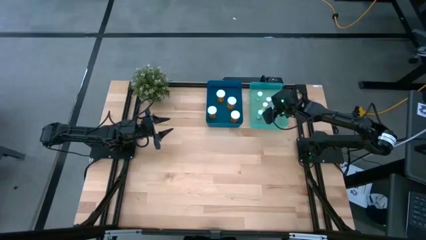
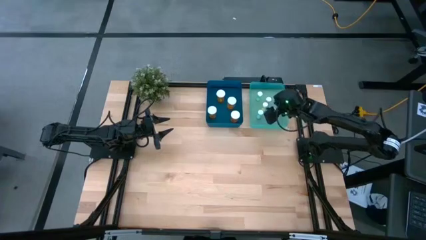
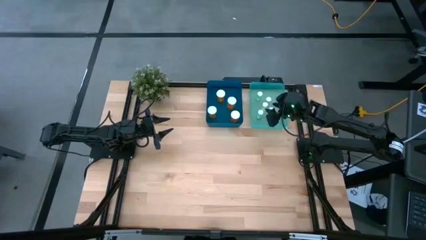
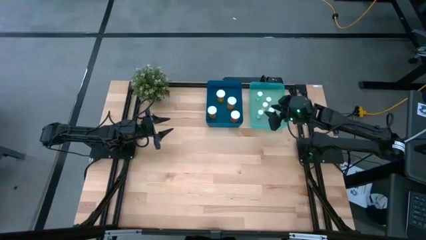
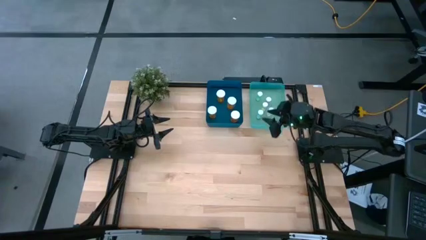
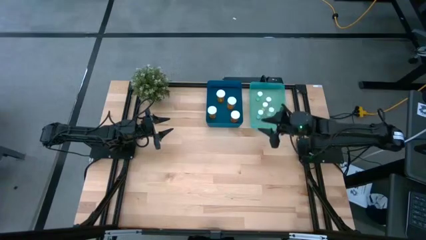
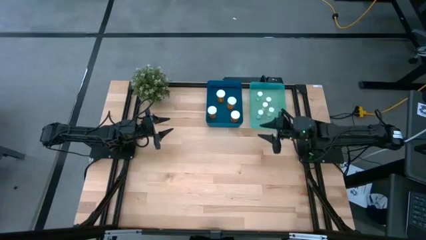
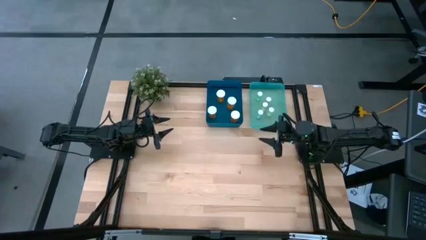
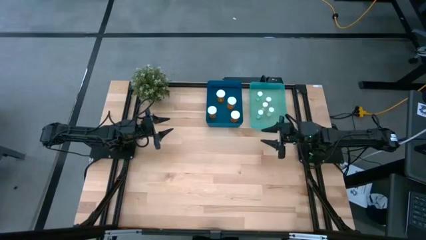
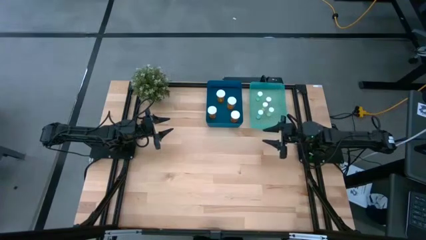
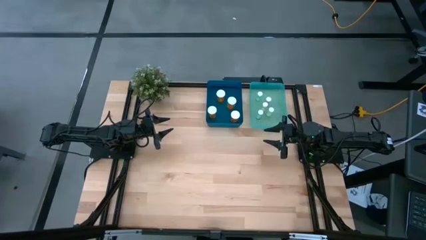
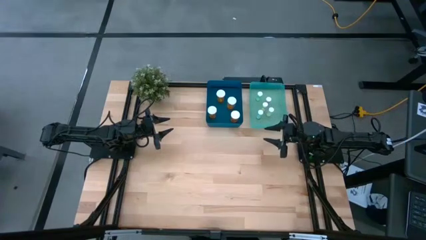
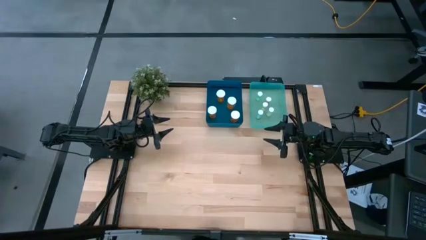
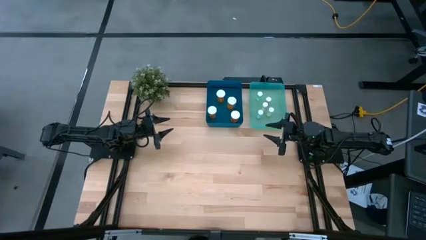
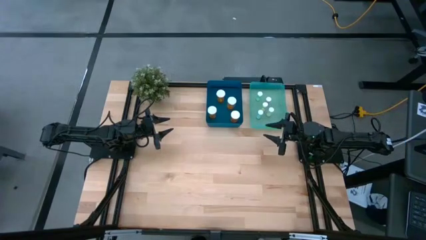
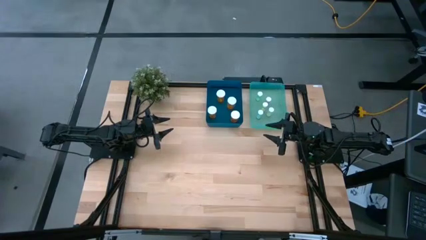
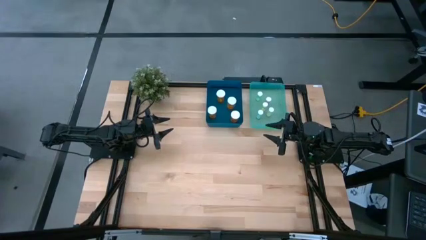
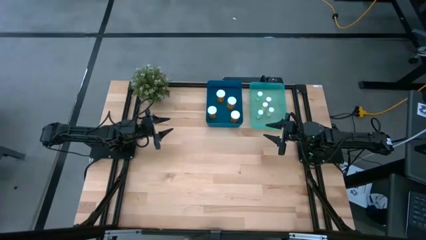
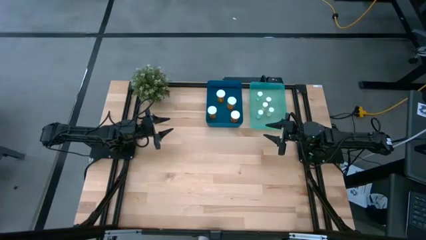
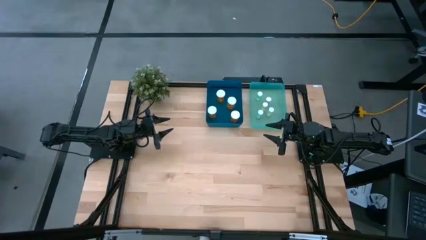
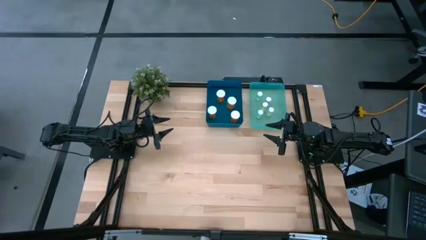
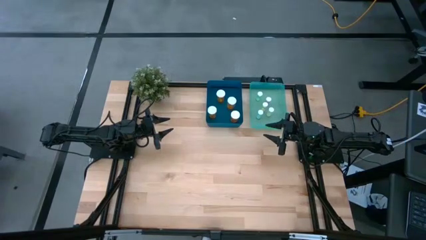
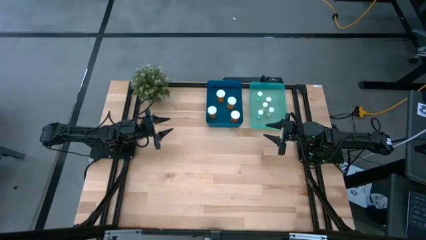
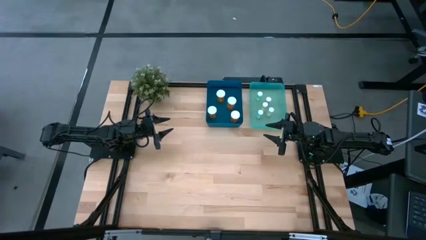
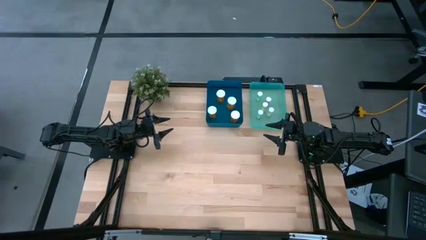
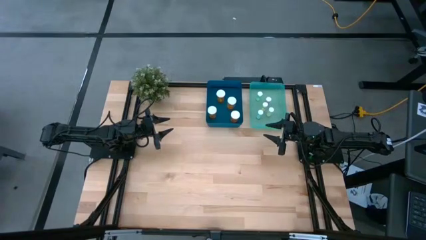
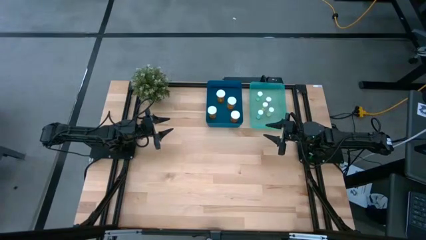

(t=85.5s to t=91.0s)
Task: Pick and place medicine bottles into bin by pill shape (circle, oval)
Return to Home Position

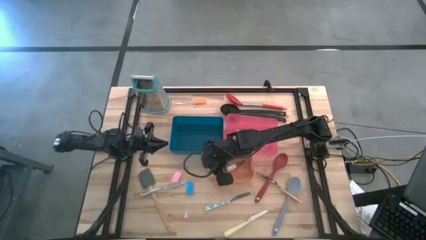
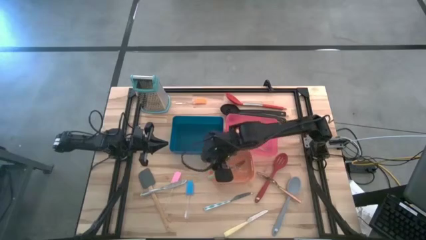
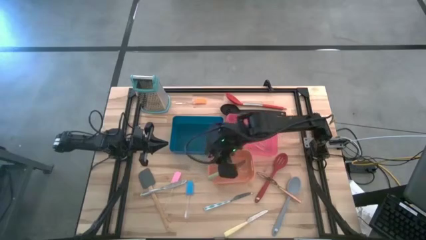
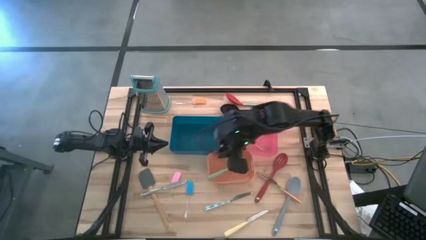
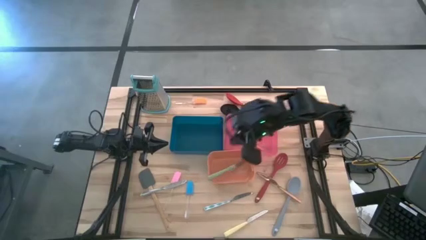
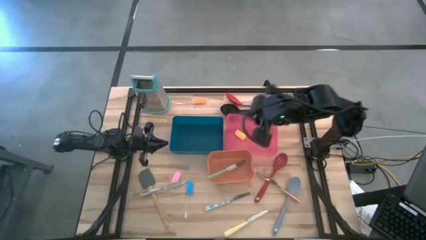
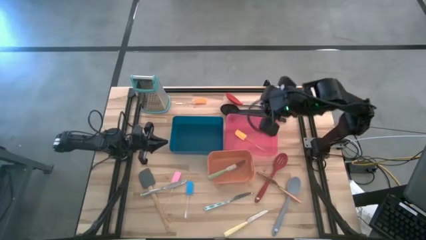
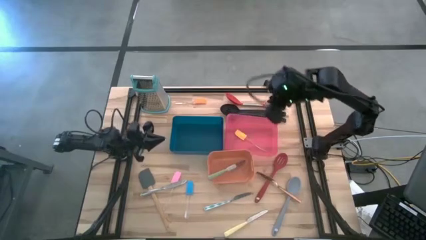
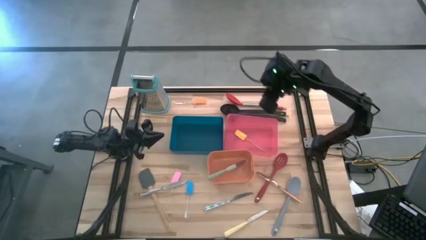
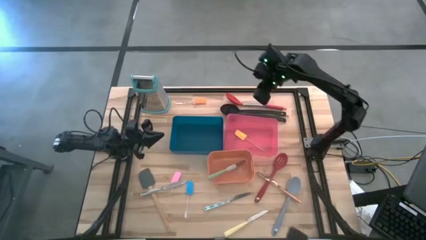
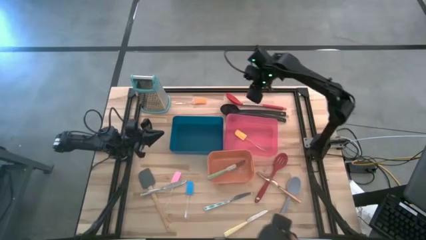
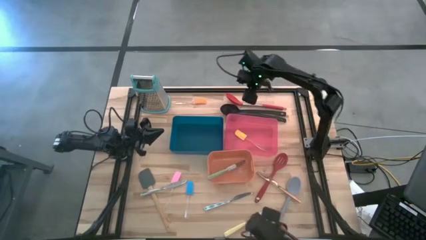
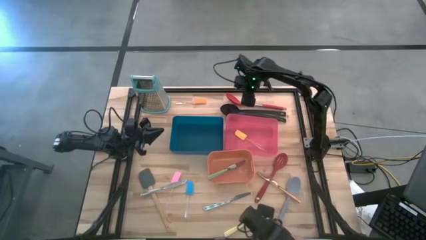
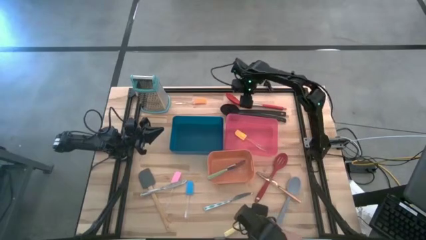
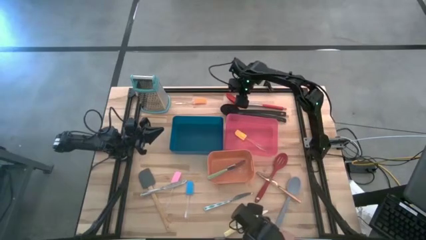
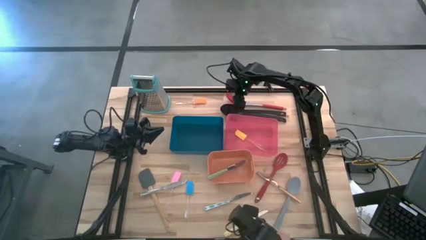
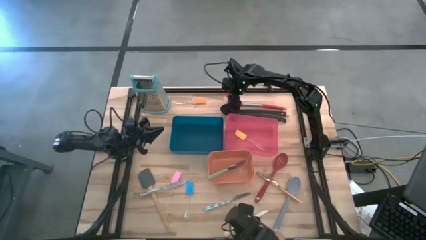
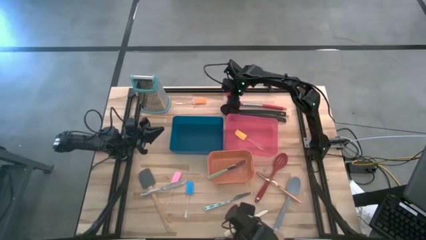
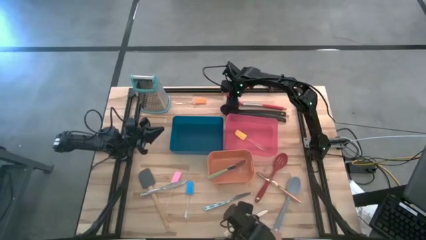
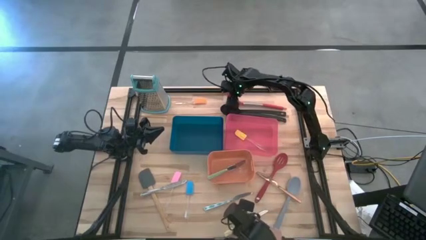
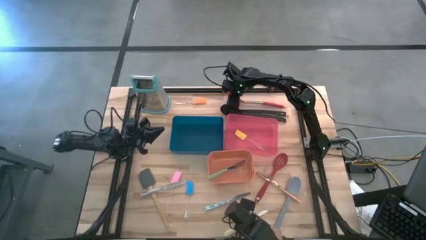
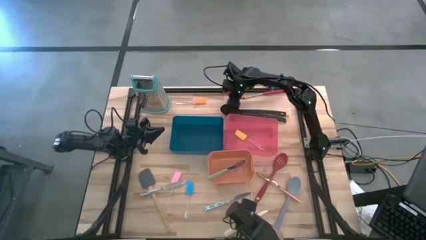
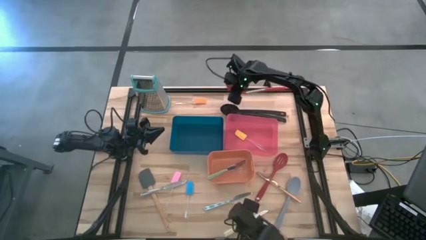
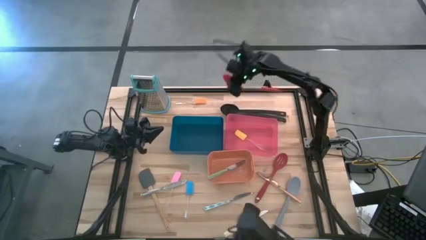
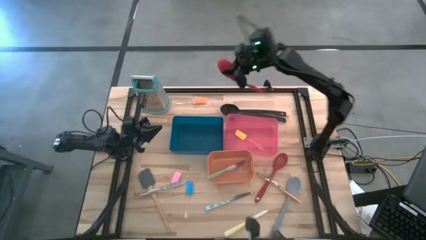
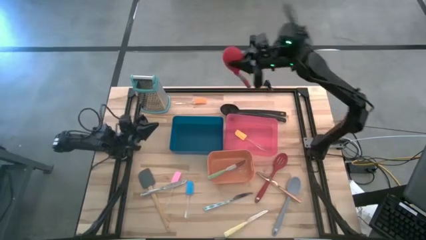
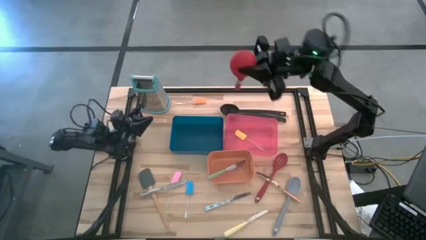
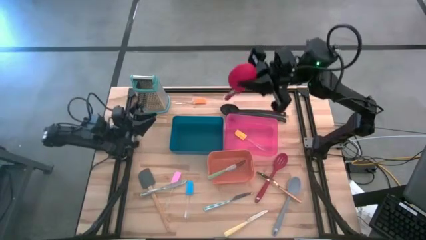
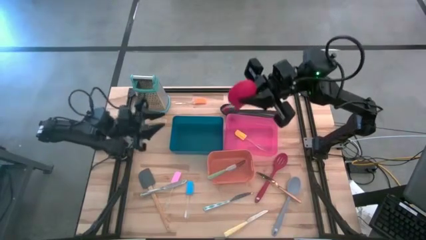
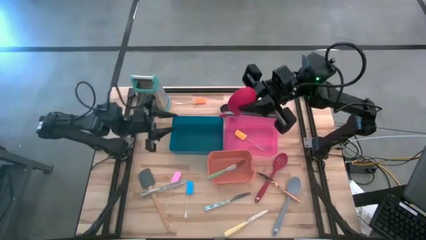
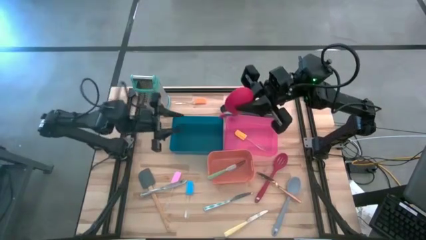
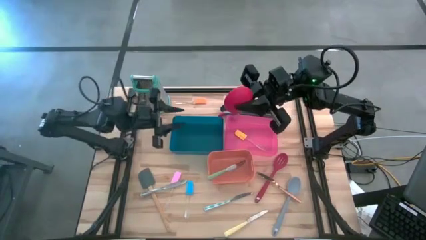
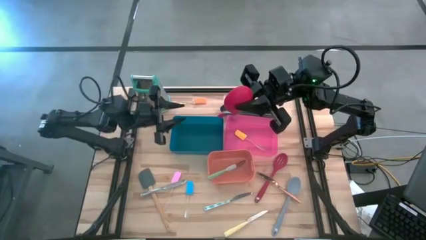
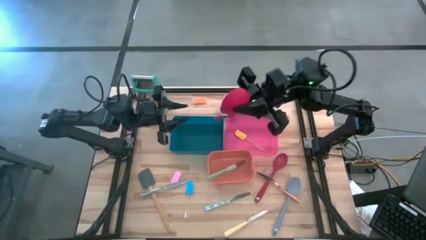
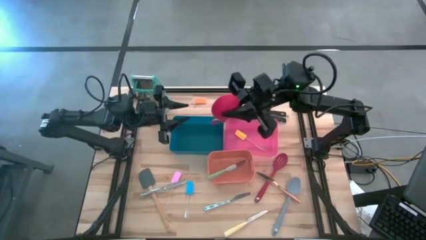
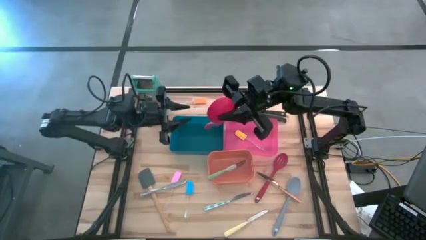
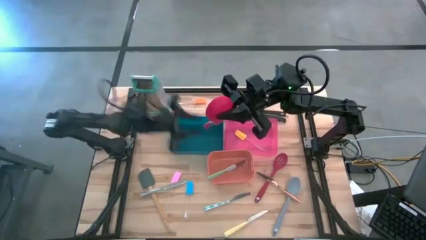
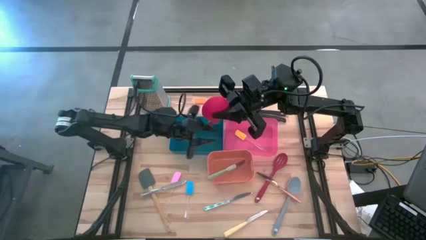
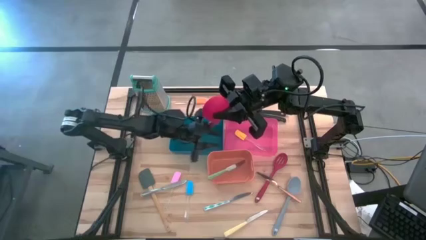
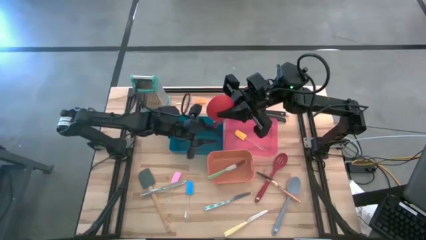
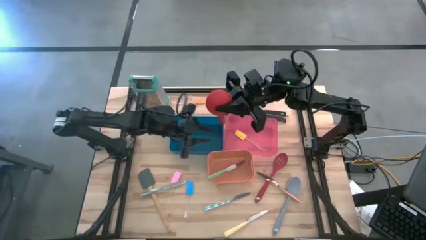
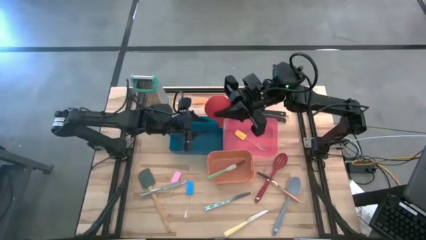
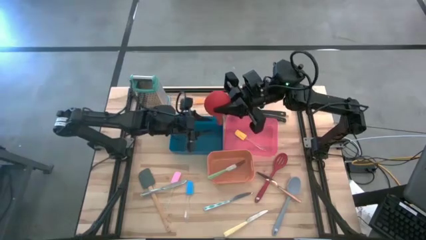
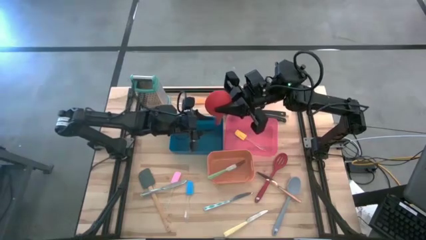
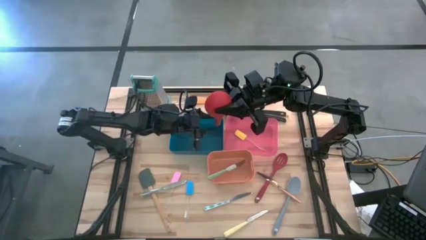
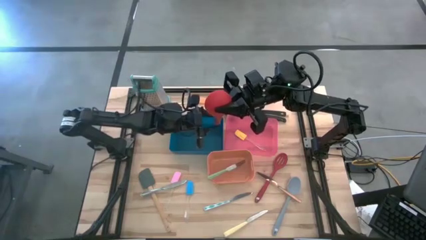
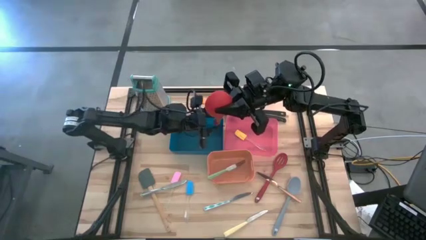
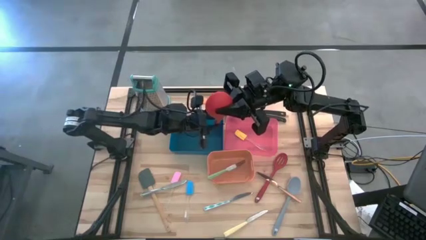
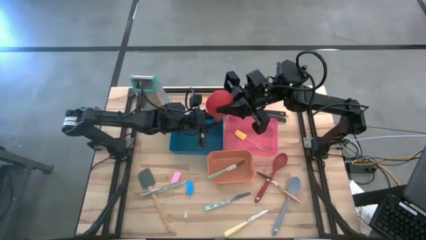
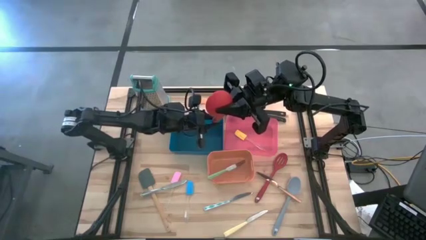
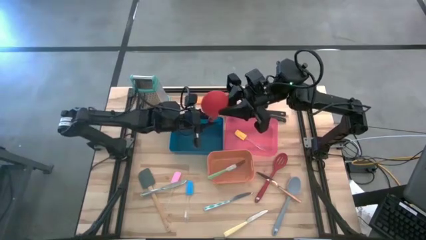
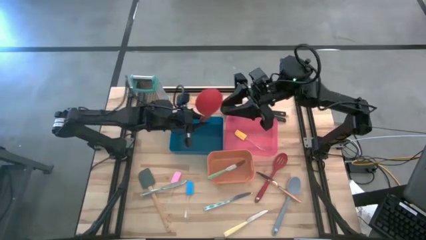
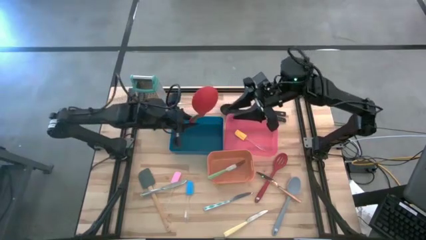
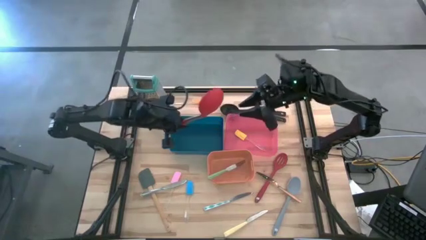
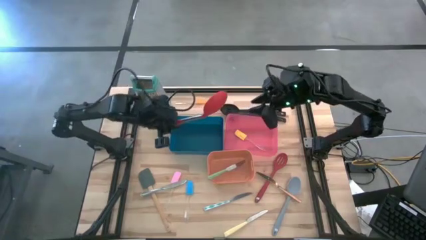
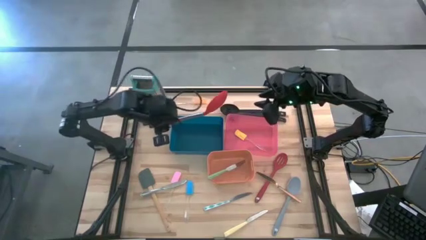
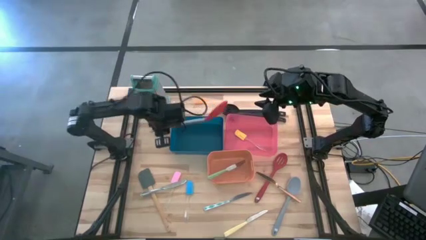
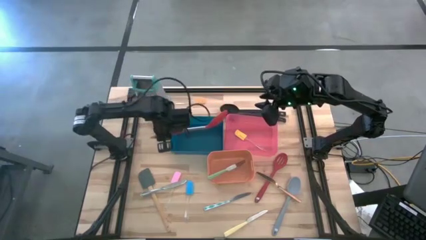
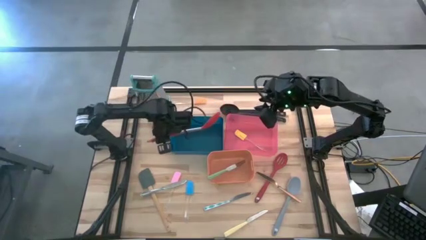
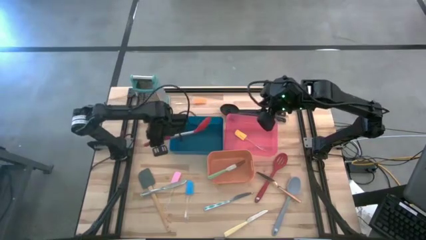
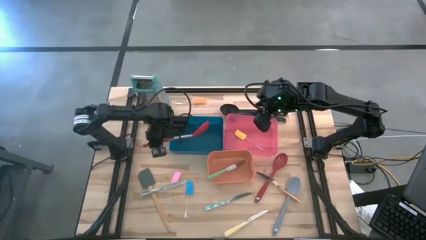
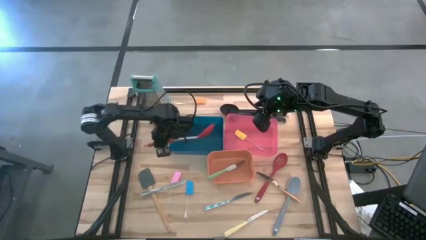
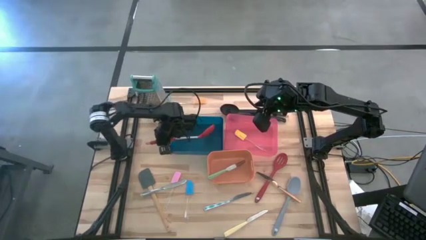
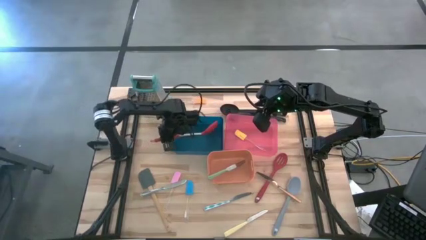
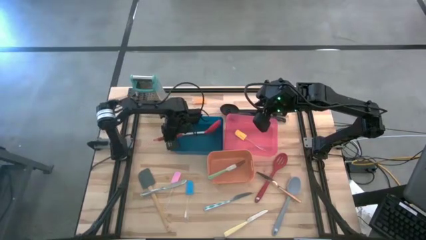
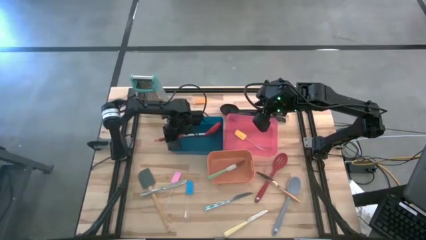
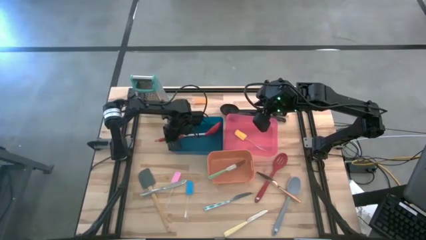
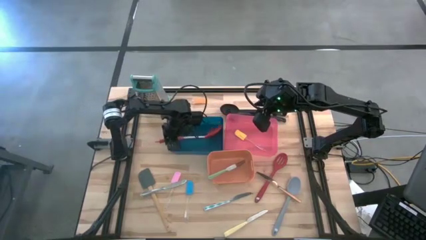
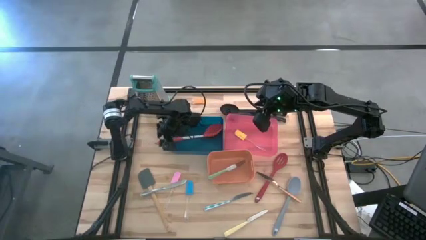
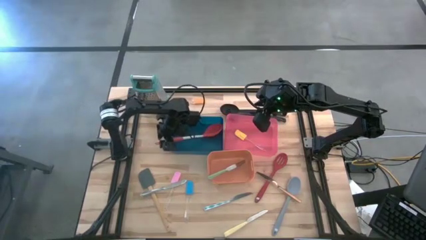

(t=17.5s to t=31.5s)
Task: Pick & Place Kitchen Items
Put the red serving spoon into the blue bin
